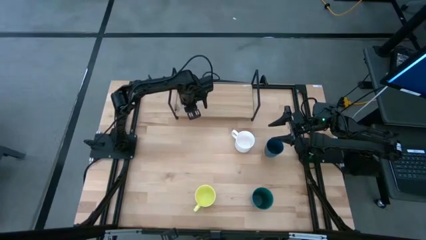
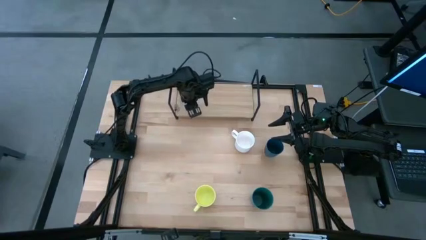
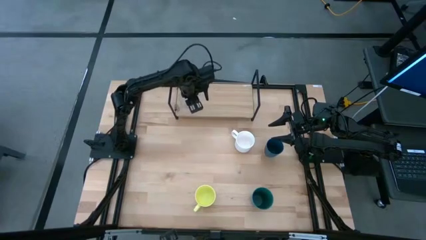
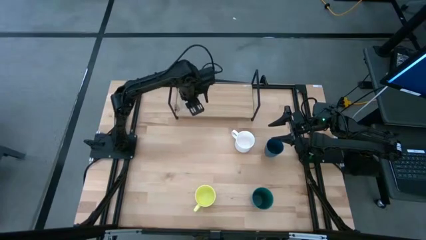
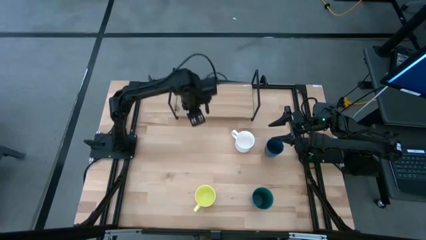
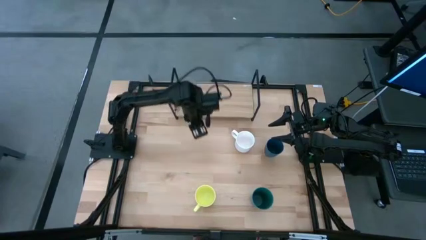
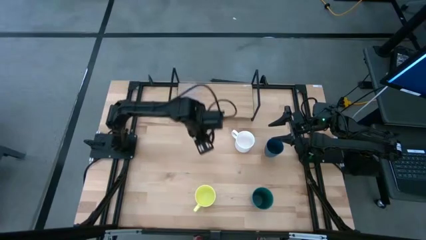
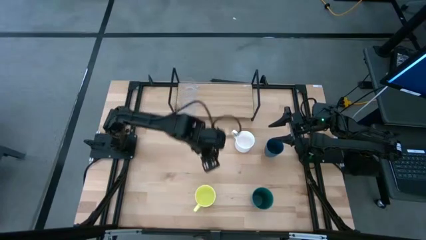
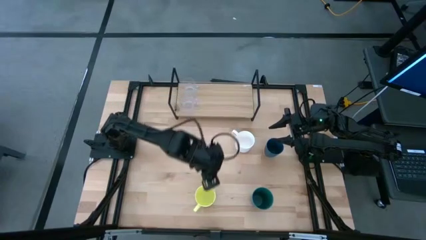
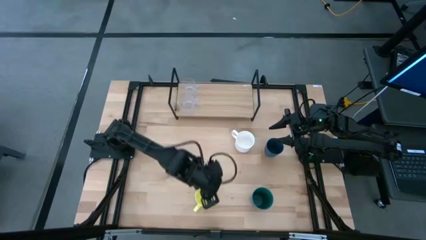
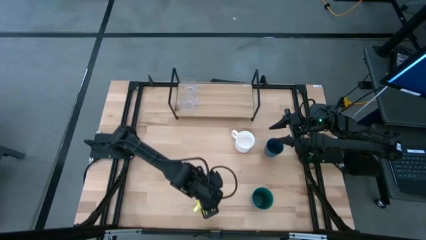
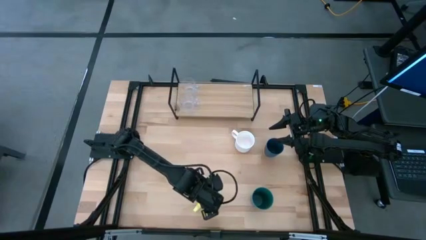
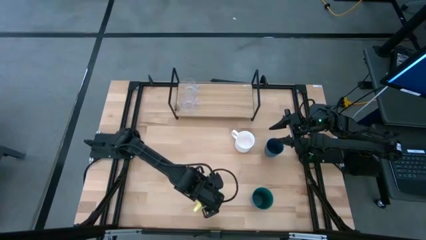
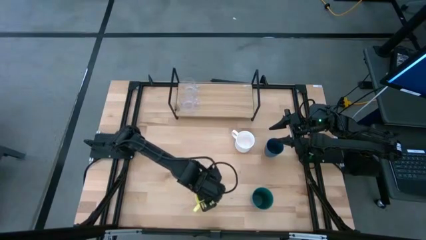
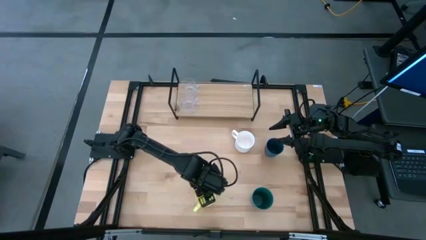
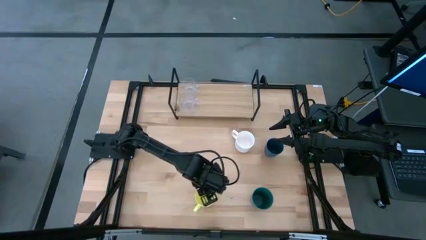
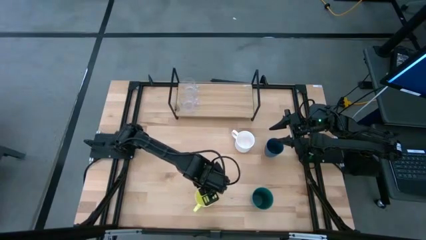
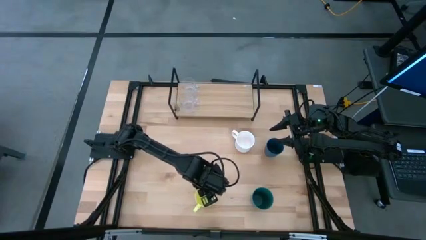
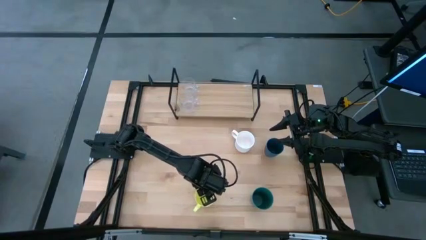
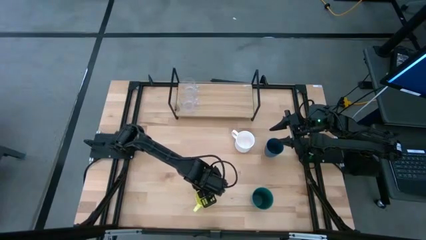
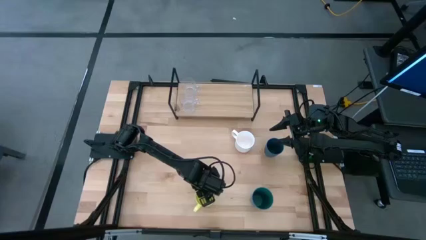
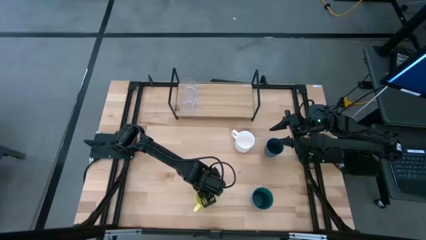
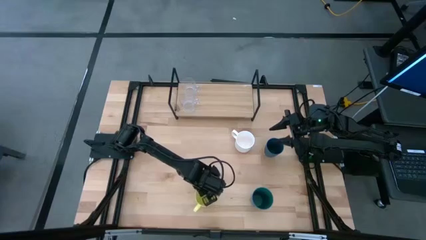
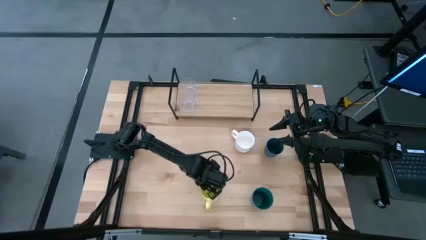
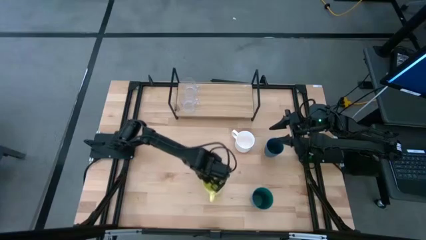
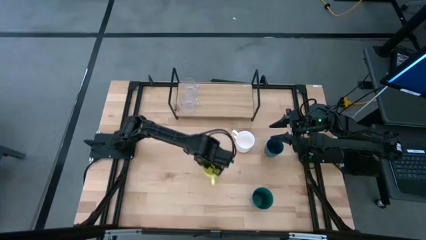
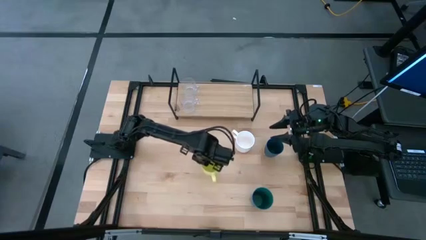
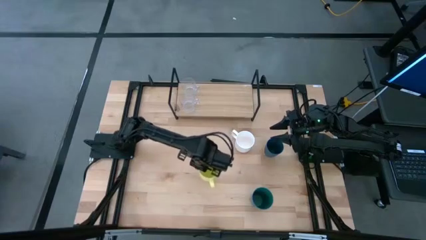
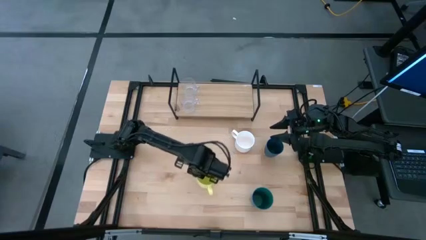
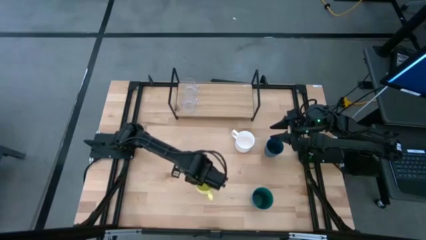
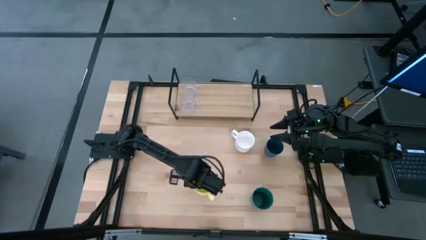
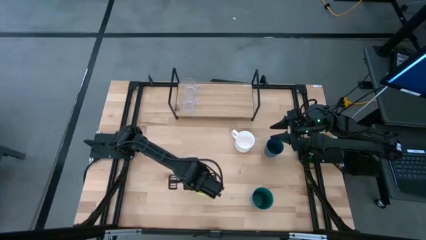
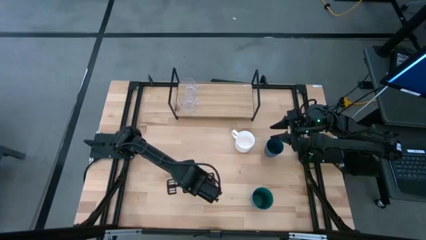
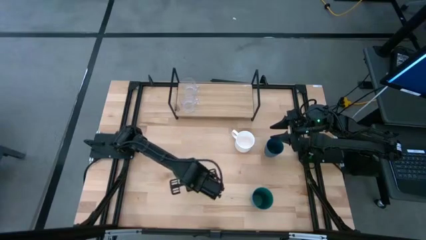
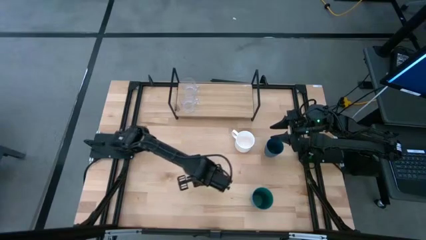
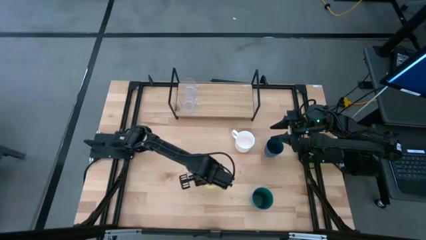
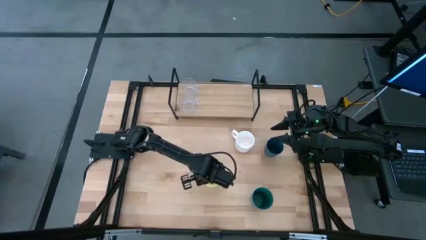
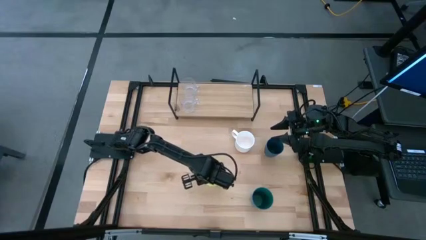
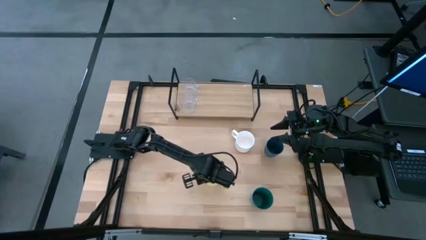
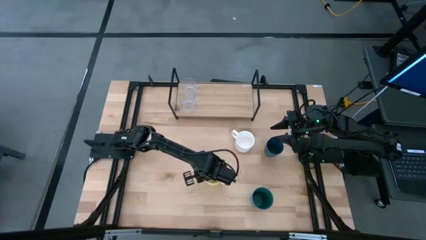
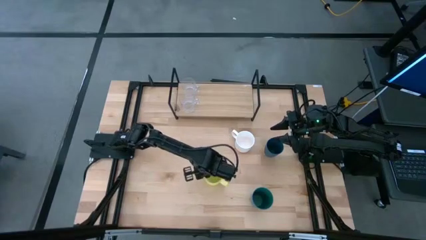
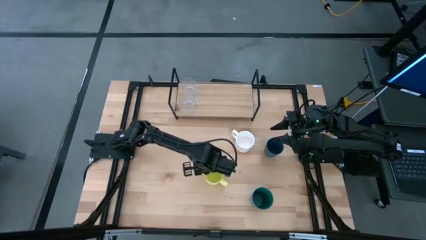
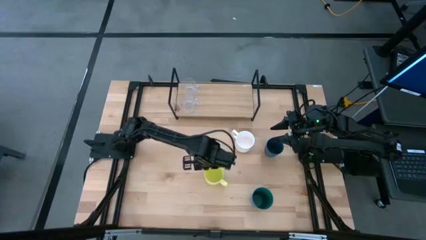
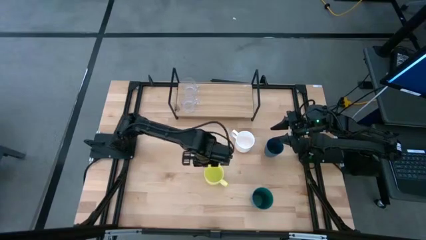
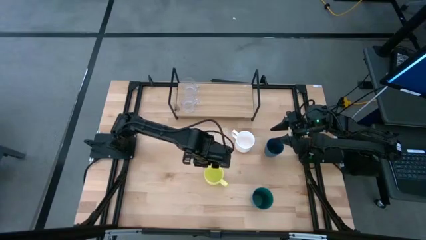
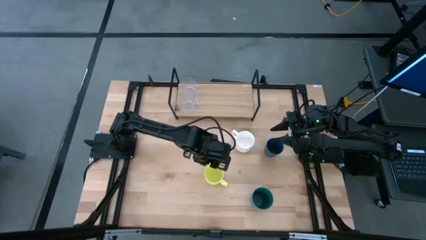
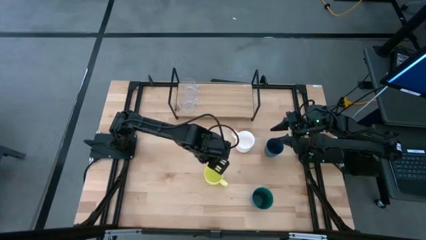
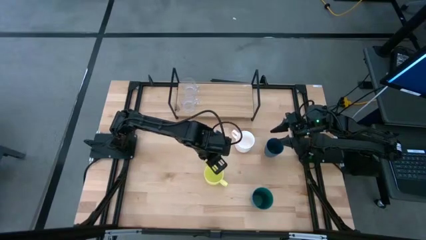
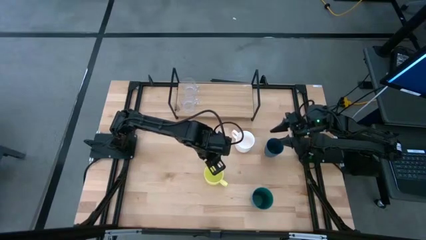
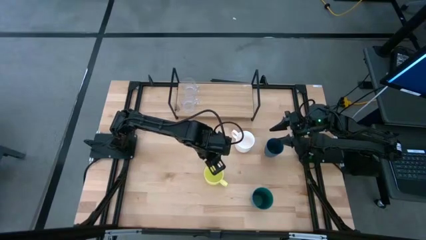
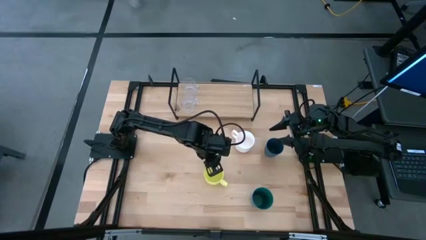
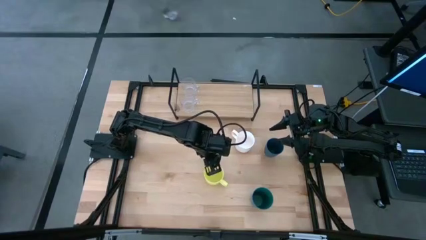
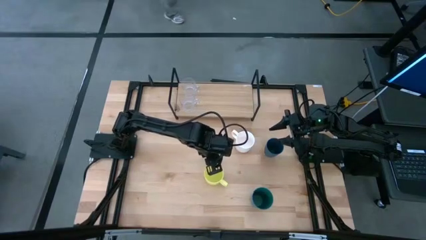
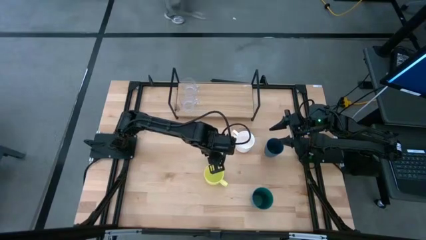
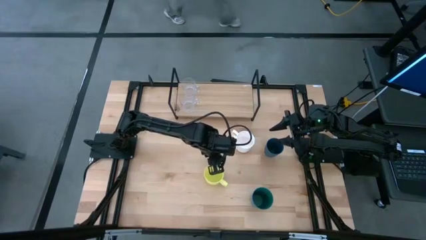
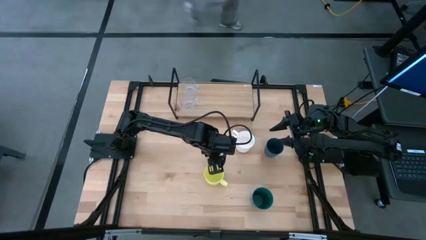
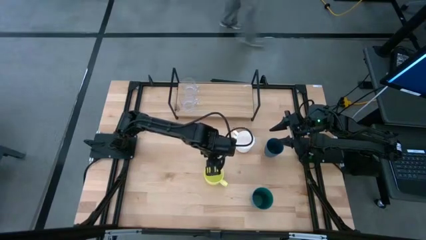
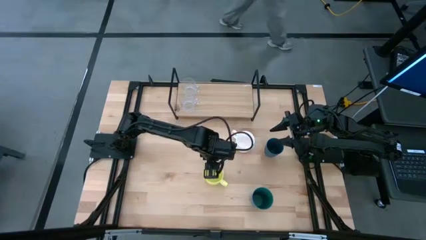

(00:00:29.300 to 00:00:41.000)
Task: Stack small to large cups/mugs on shelf
Put the yellow mug on the shelf

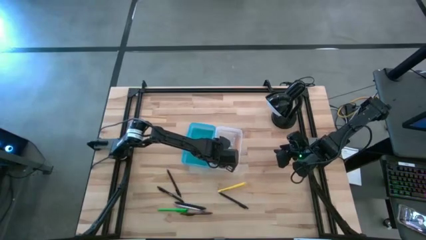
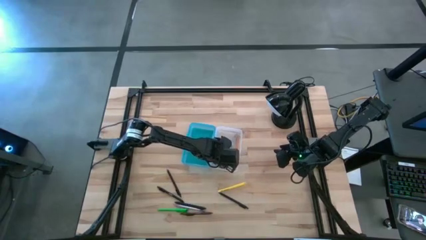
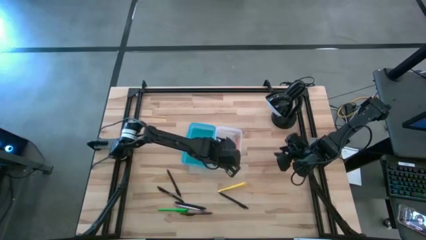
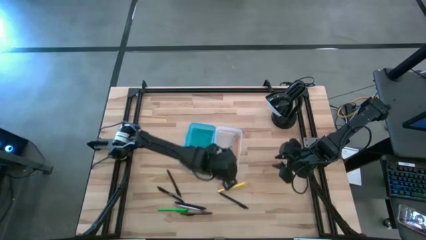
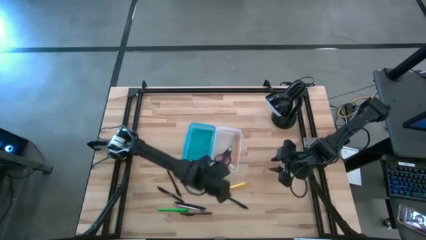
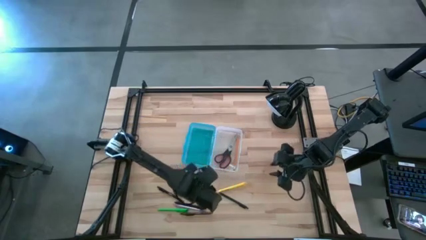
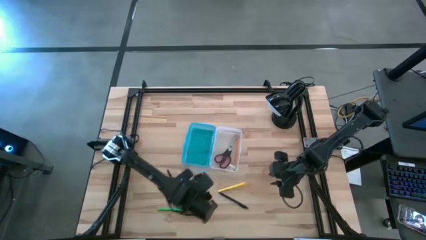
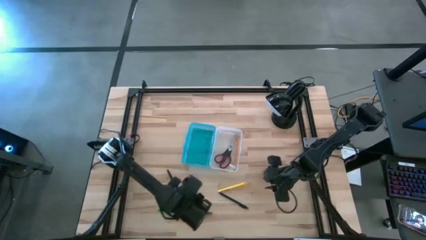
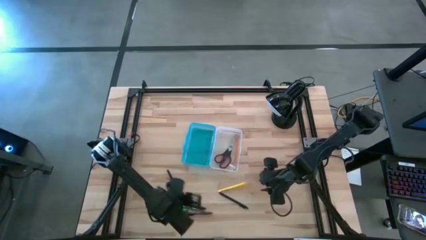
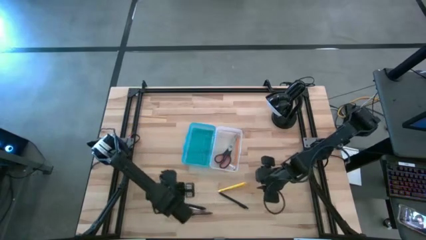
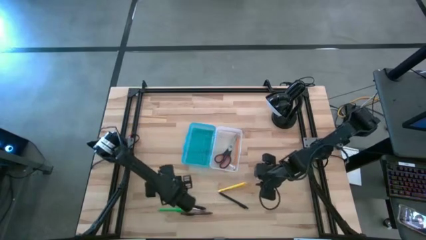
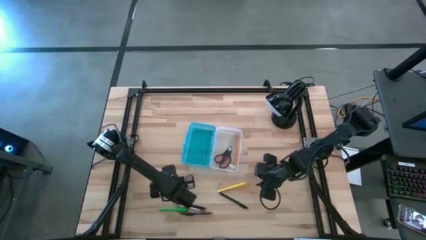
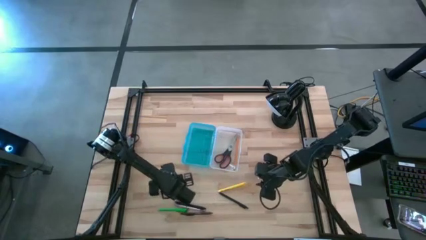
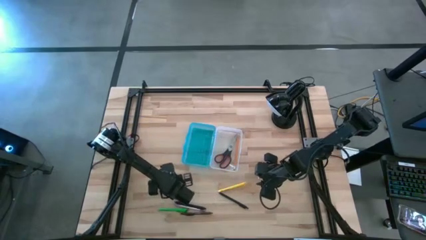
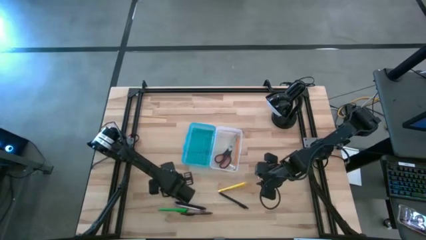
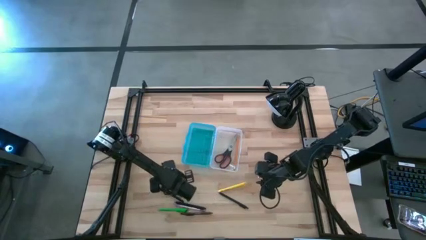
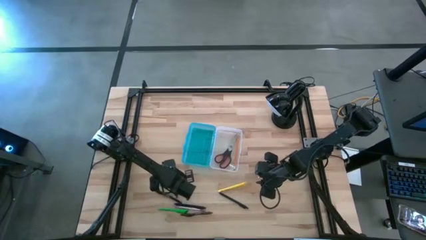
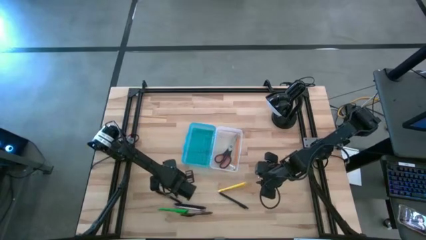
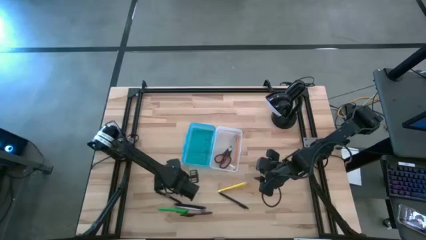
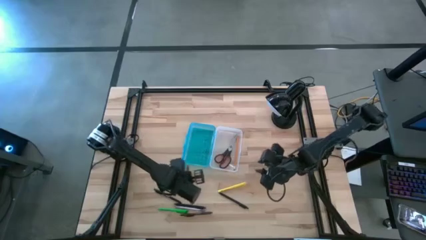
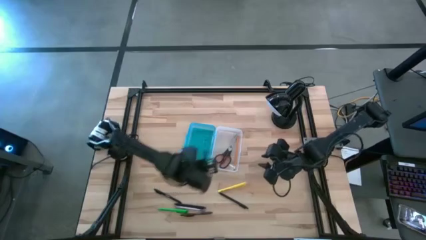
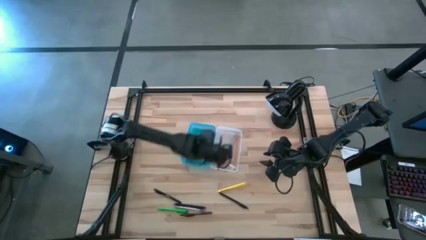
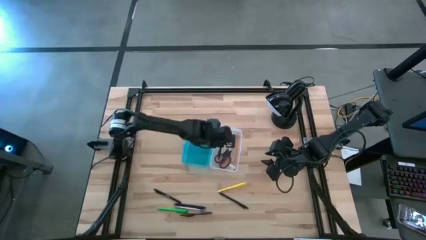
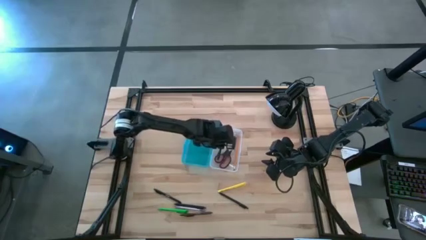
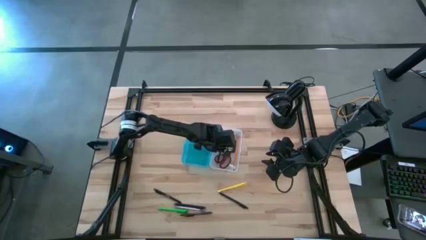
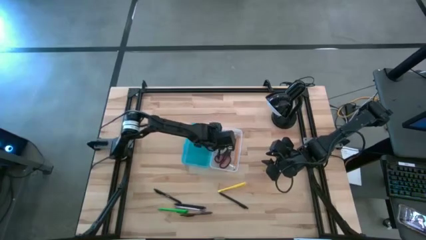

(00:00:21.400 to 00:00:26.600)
Task: Pick & place school supplies into a supply box
Put the black pen into the supply box
